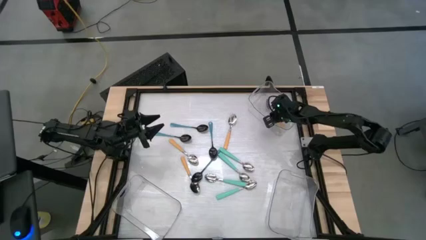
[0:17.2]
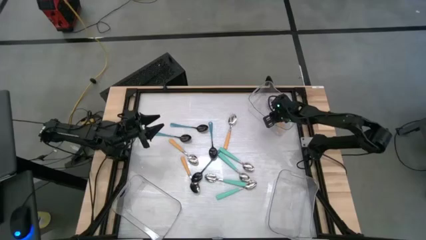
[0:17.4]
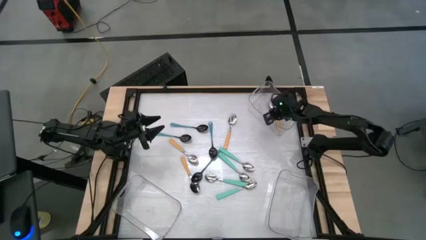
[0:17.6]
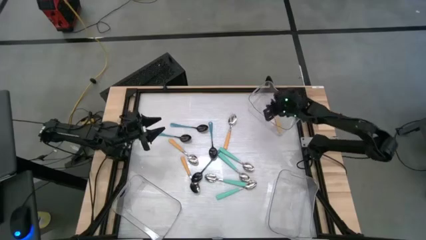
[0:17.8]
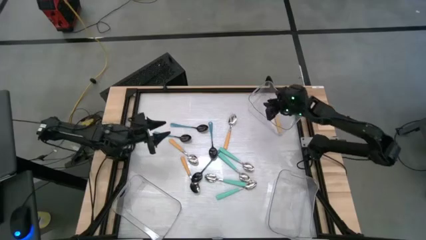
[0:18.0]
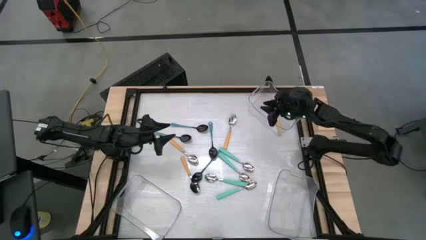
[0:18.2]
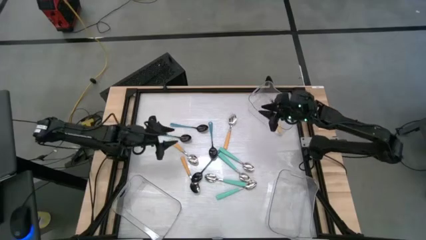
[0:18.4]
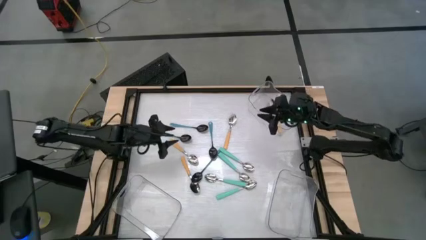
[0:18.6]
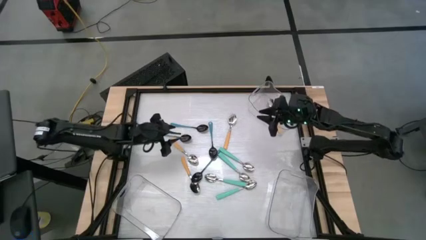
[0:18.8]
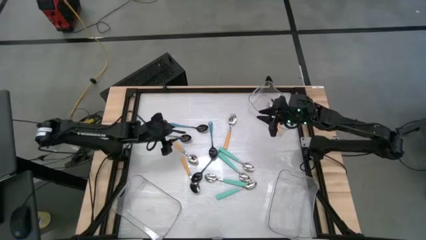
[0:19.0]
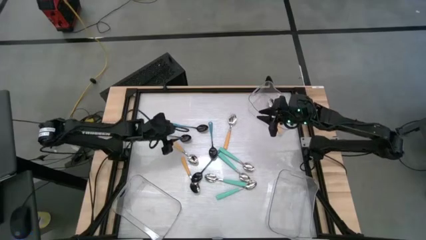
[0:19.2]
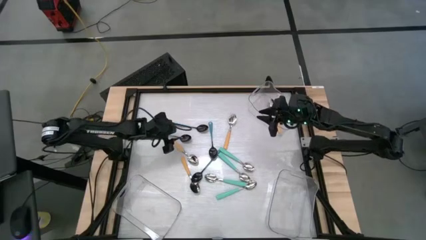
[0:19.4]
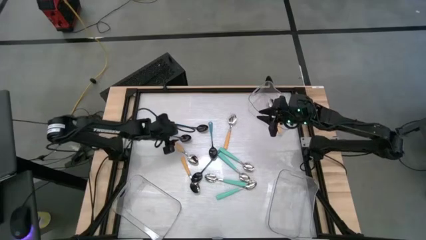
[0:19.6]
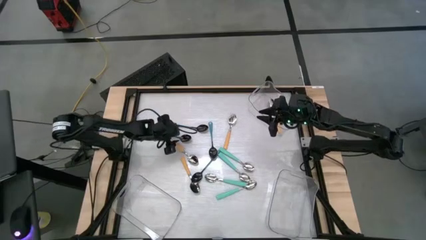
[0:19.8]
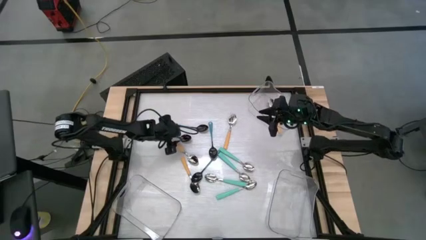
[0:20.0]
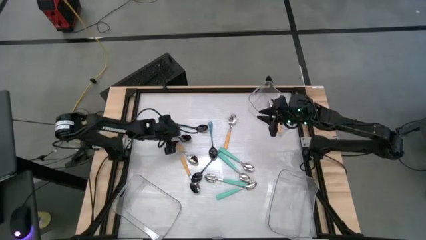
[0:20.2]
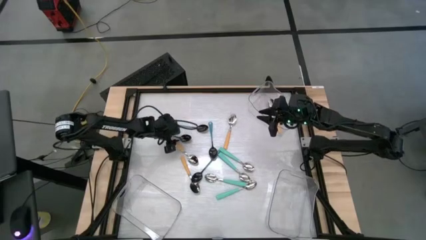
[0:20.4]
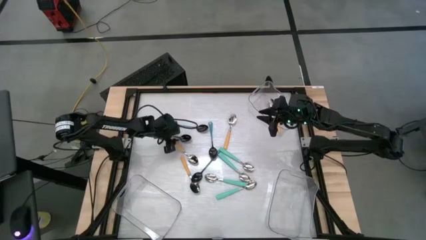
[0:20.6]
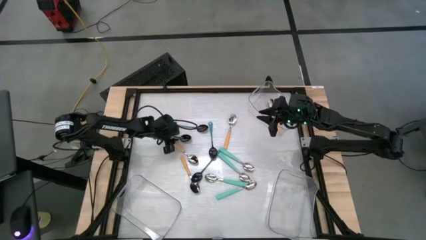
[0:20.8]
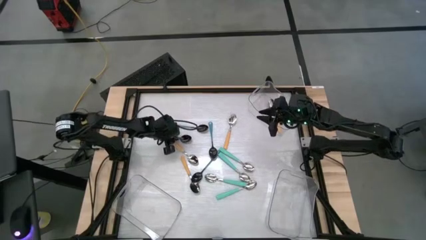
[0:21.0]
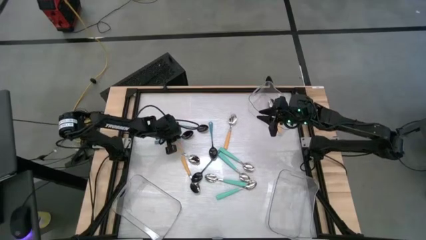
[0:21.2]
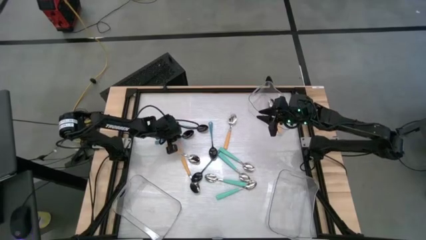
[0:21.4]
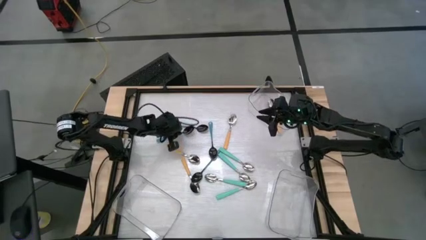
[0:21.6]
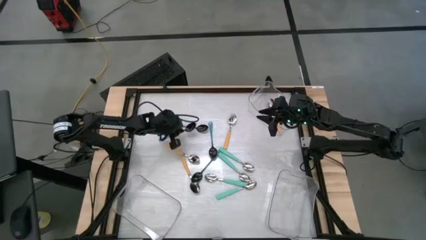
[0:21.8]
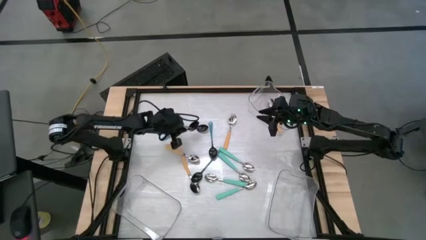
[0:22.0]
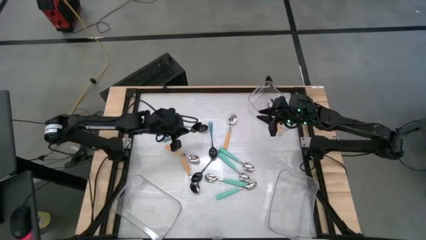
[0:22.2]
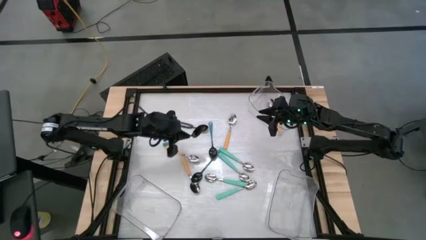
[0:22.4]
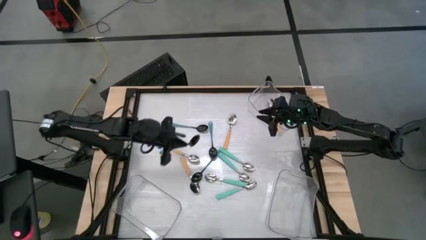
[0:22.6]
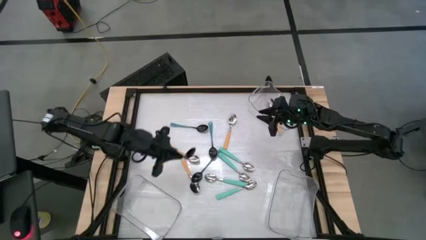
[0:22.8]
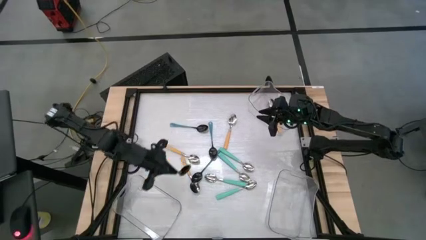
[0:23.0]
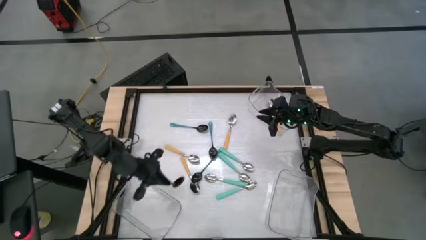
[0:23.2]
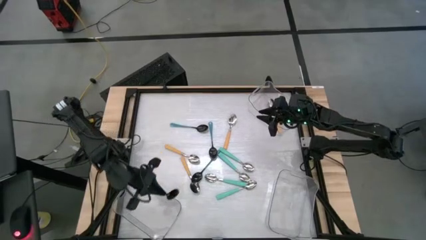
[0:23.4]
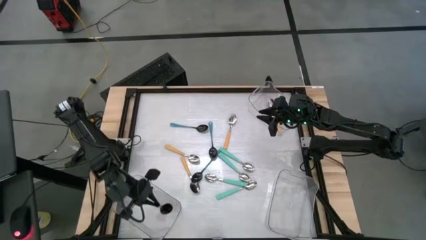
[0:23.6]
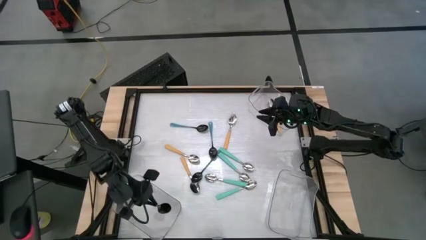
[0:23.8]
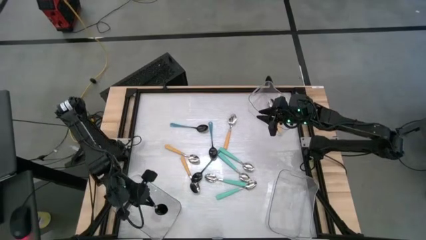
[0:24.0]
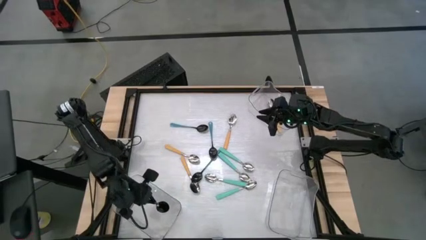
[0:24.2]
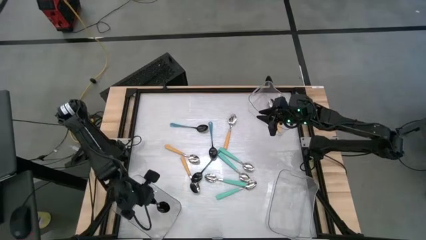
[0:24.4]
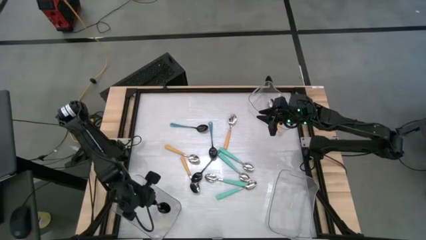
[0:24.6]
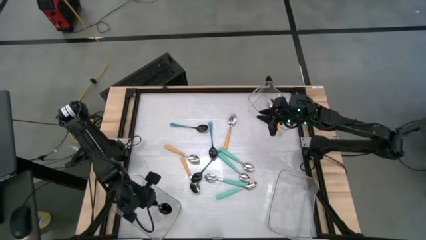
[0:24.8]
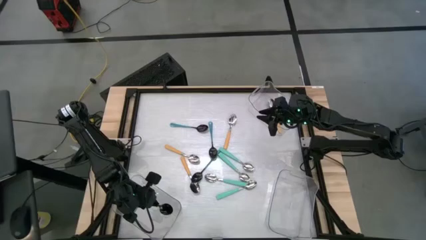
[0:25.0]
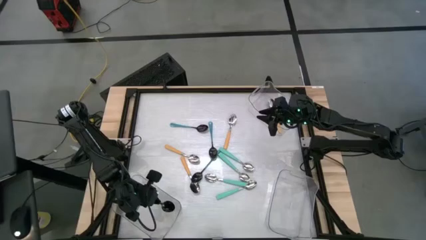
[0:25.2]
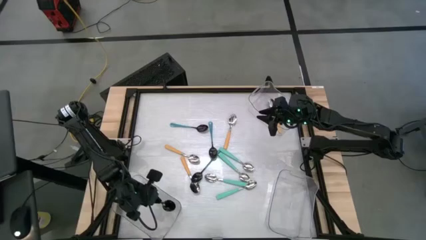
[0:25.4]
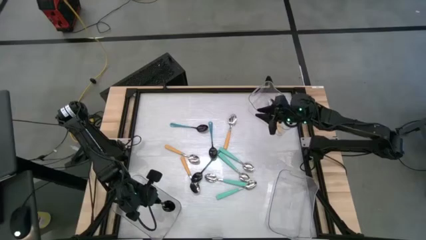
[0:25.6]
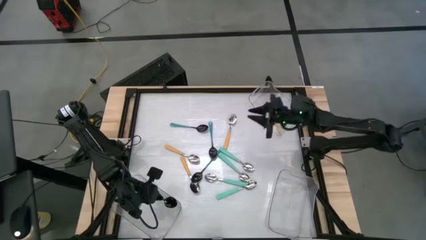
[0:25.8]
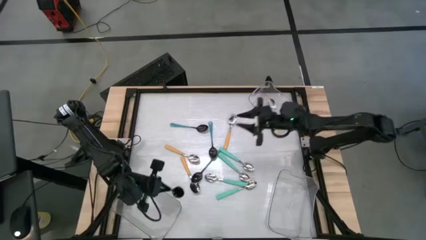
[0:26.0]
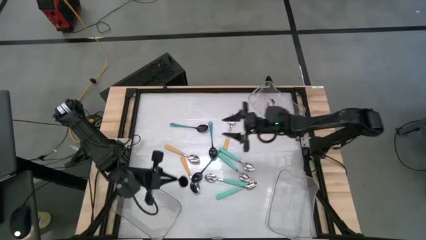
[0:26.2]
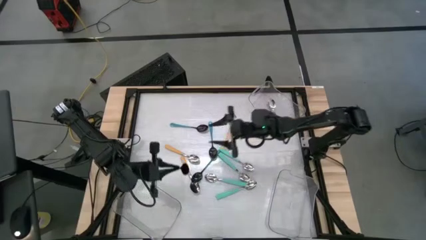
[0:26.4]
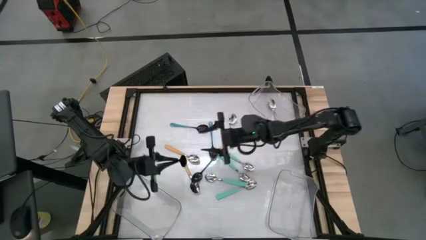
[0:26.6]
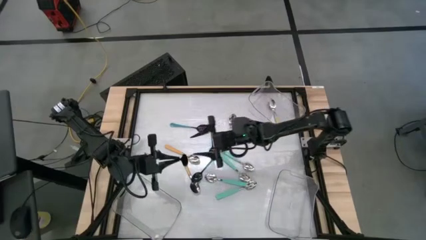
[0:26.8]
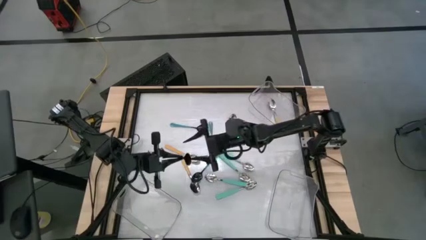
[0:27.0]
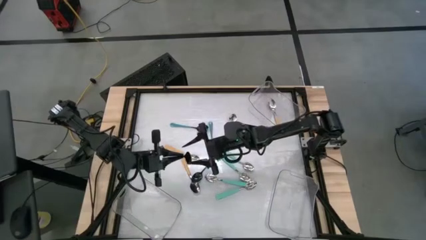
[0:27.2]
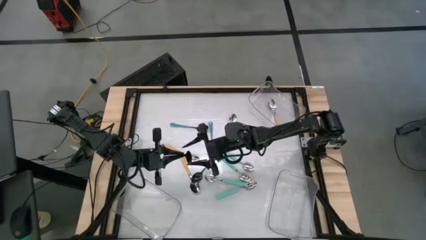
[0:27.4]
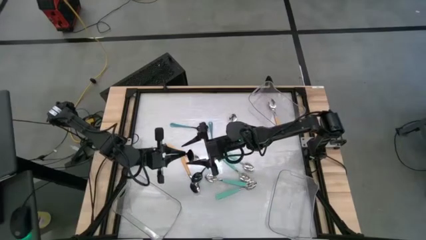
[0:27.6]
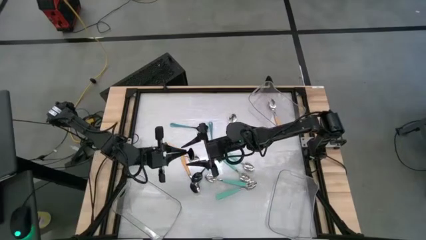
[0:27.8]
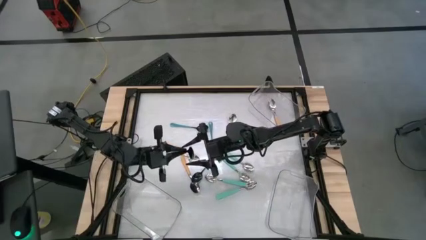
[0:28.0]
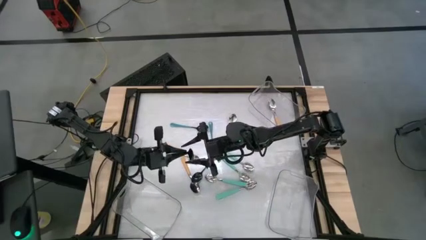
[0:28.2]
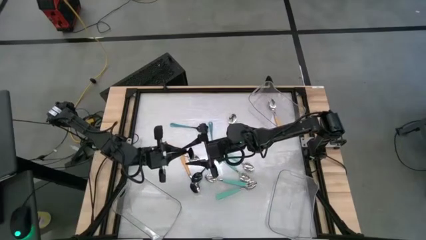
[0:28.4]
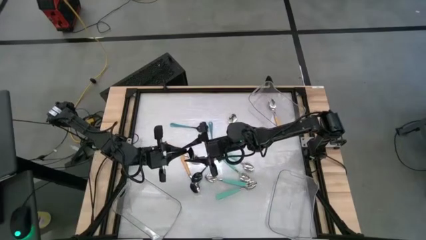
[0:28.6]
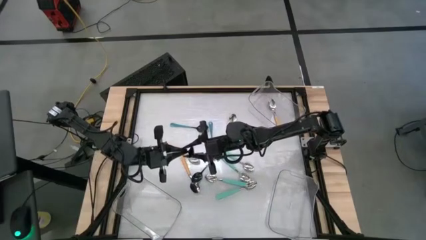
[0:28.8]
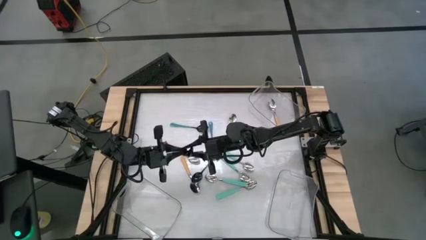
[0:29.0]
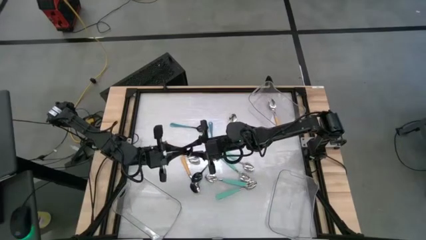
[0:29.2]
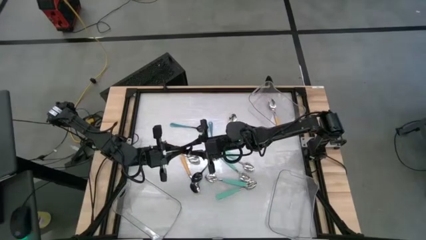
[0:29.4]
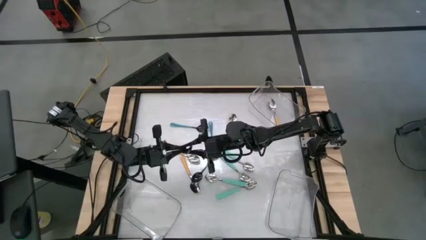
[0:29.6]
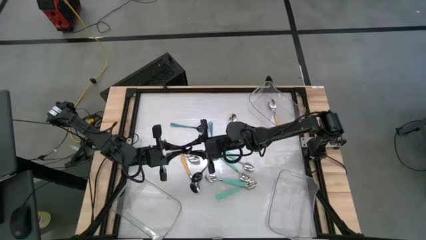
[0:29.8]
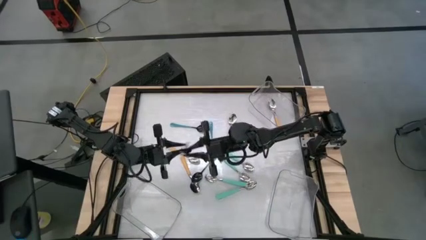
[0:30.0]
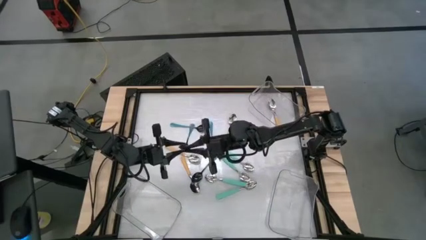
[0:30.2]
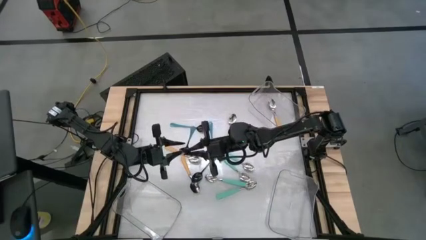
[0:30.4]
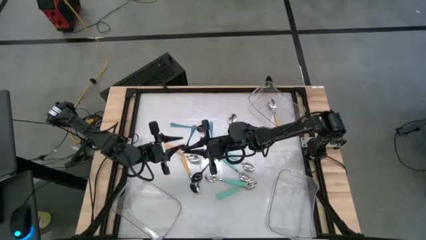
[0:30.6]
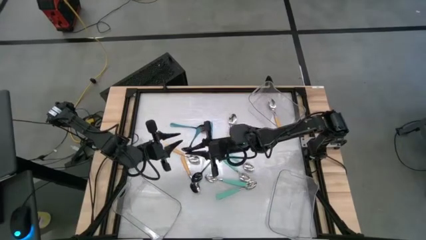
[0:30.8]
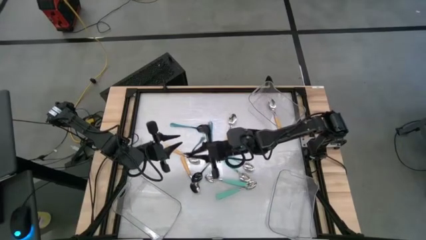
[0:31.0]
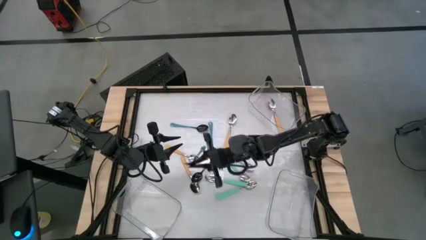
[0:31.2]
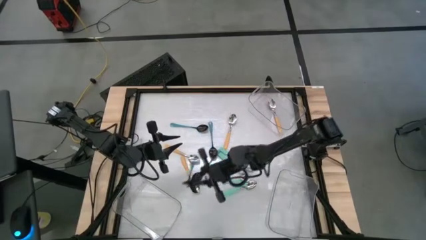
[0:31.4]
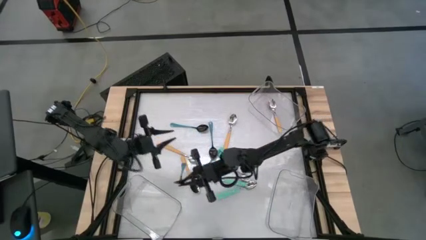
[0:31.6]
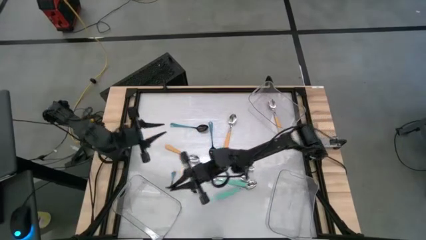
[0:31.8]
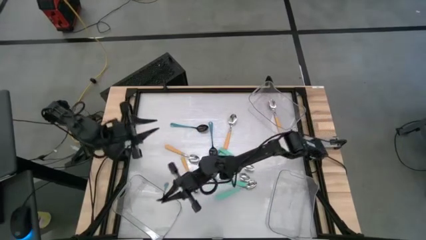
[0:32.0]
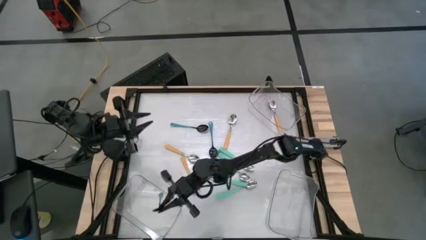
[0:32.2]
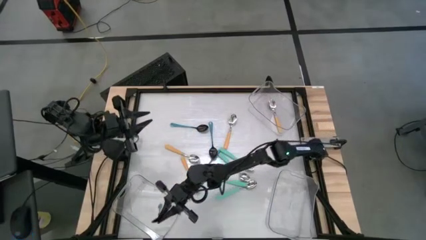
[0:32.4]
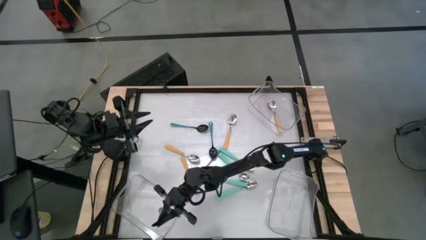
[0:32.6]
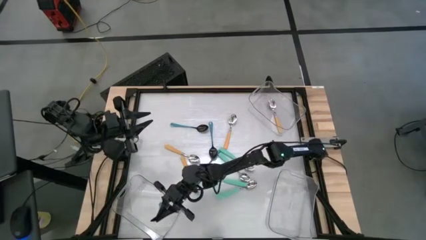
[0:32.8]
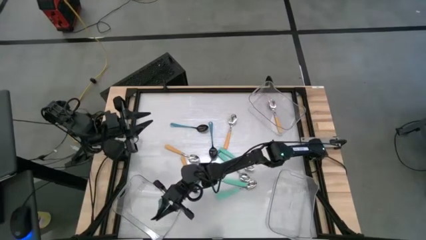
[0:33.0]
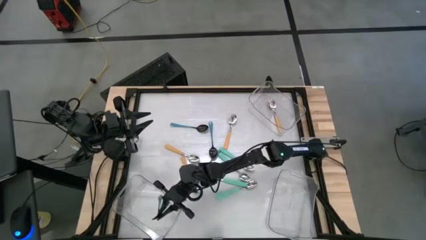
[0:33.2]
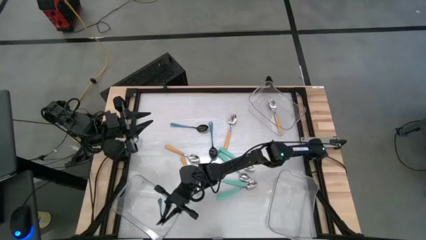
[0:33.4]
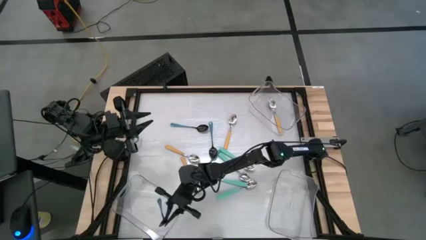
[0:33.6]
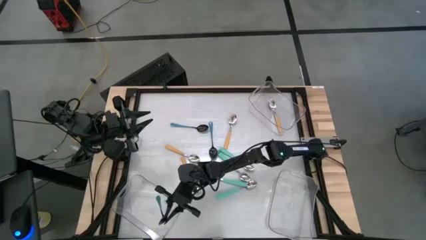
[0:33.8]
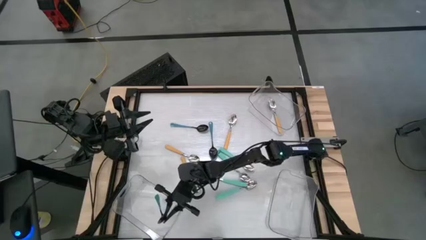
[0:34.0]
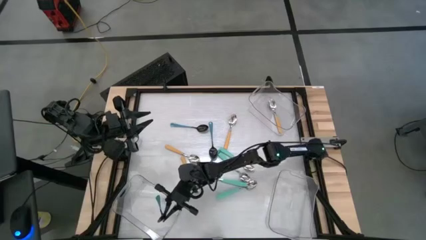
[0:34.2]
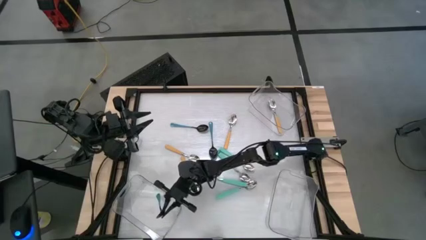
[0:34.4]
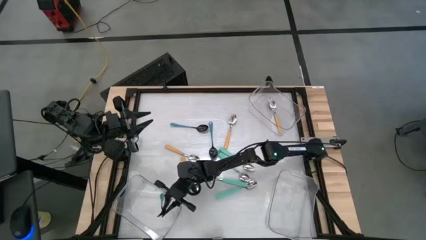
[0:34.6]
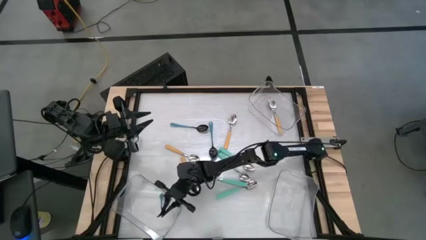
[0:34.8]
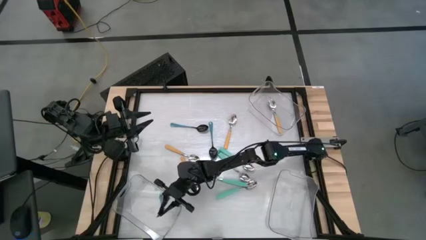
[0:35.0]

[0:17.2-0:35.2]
Task: Sort silverware by color (type)
Put the blue spoon into the bottom left transparent bin
